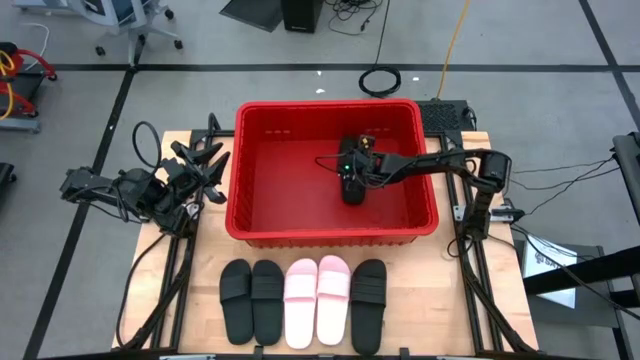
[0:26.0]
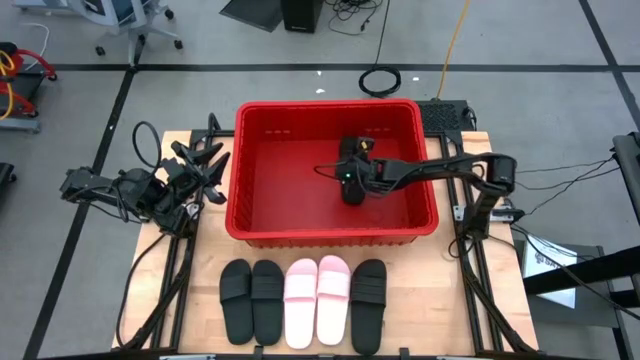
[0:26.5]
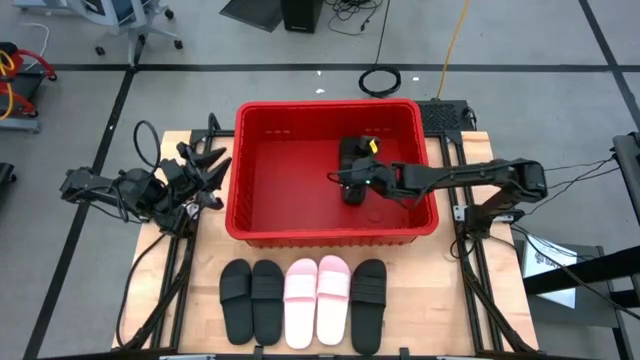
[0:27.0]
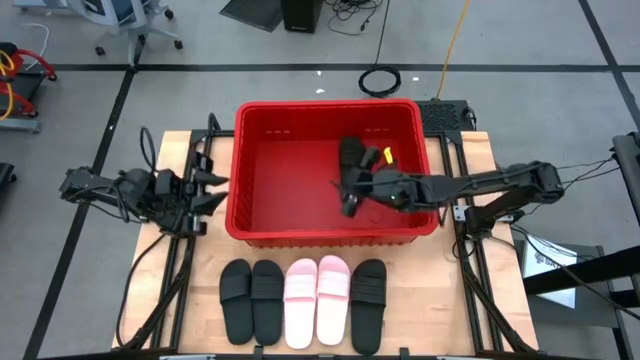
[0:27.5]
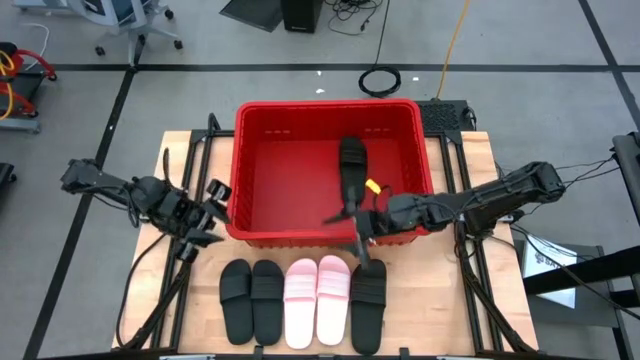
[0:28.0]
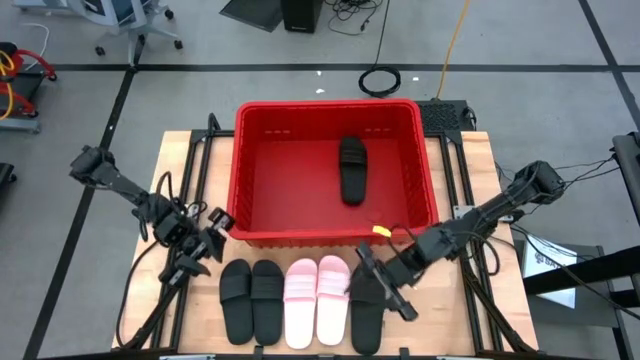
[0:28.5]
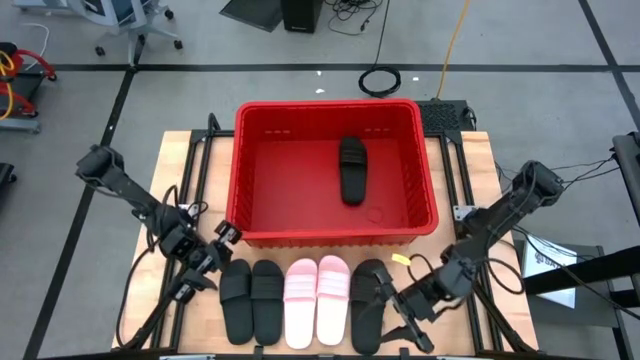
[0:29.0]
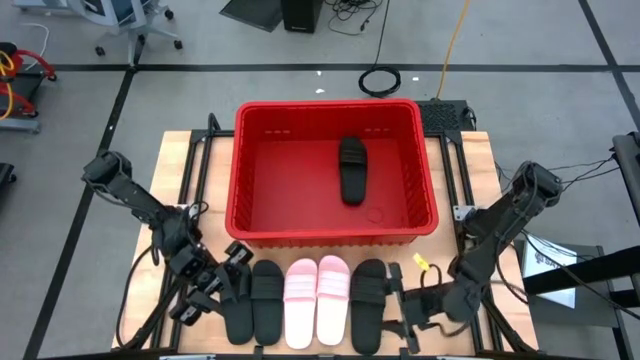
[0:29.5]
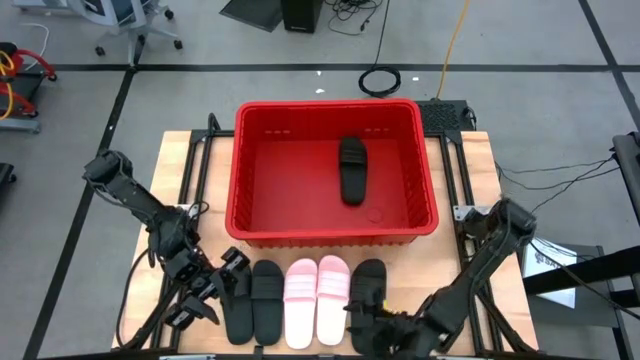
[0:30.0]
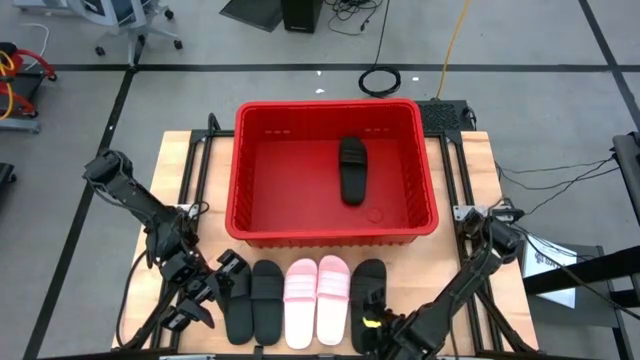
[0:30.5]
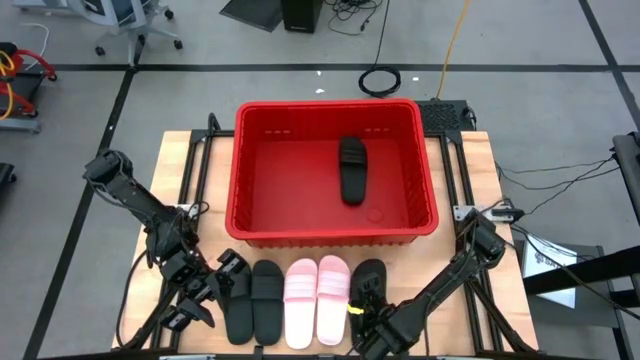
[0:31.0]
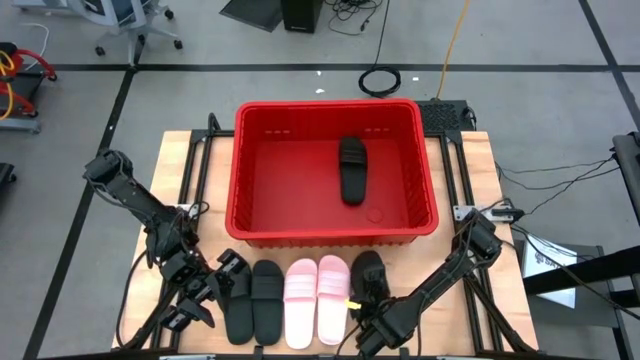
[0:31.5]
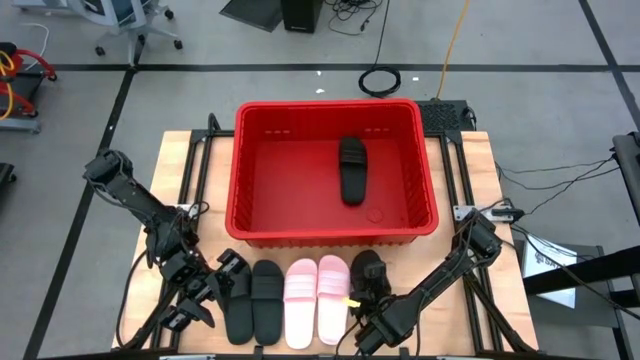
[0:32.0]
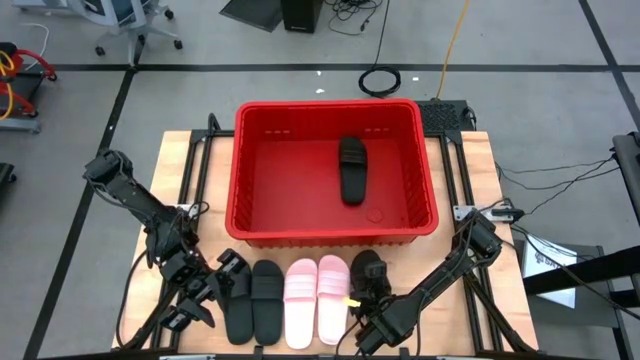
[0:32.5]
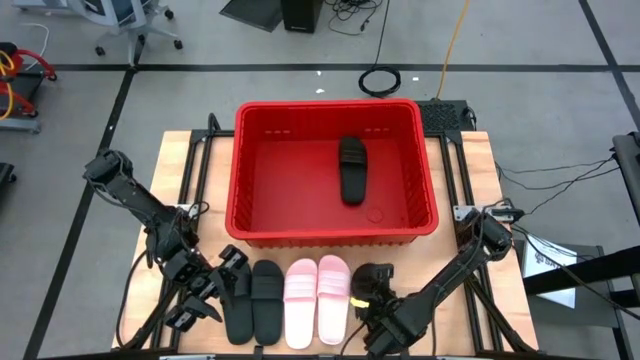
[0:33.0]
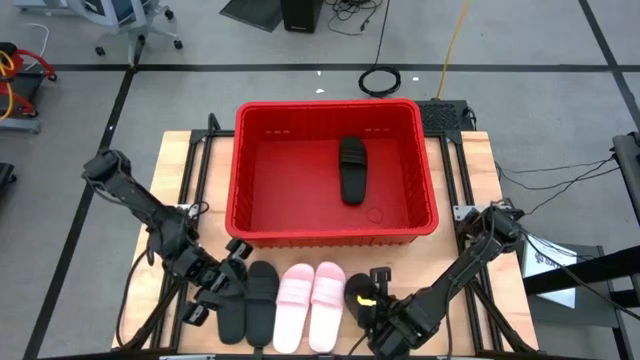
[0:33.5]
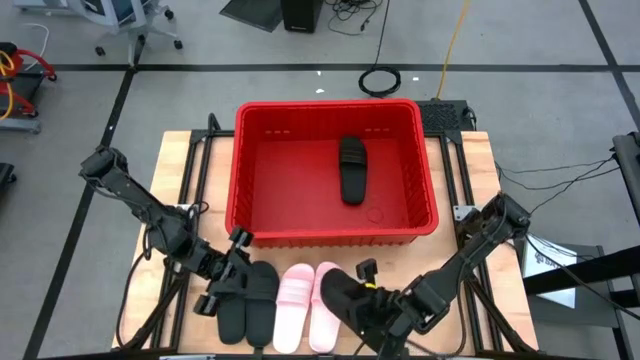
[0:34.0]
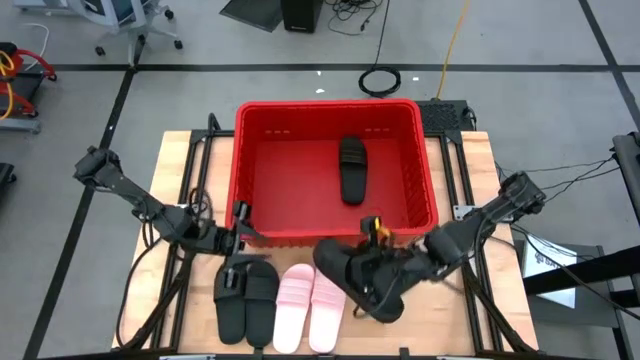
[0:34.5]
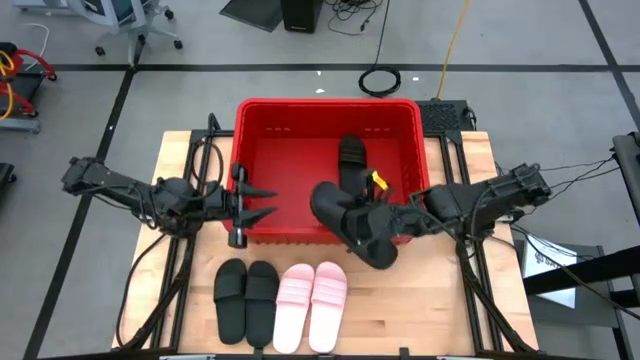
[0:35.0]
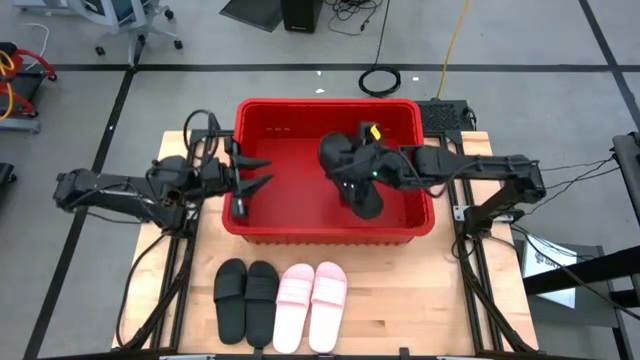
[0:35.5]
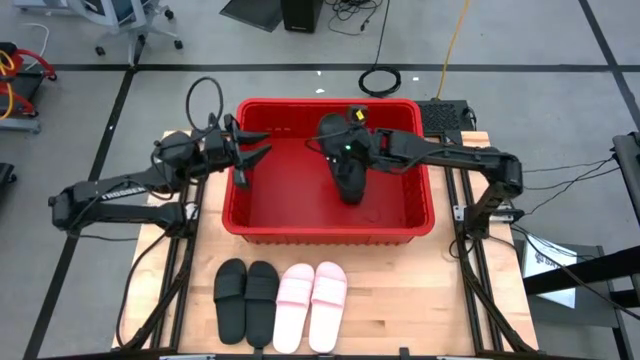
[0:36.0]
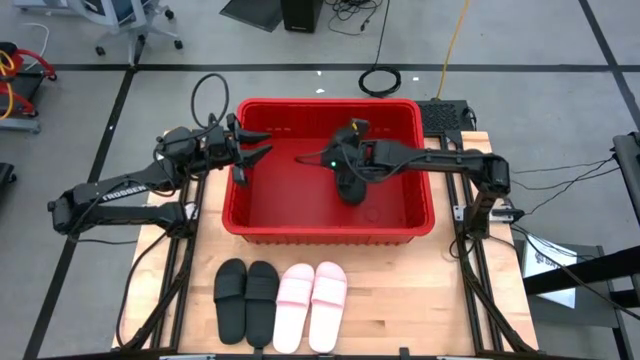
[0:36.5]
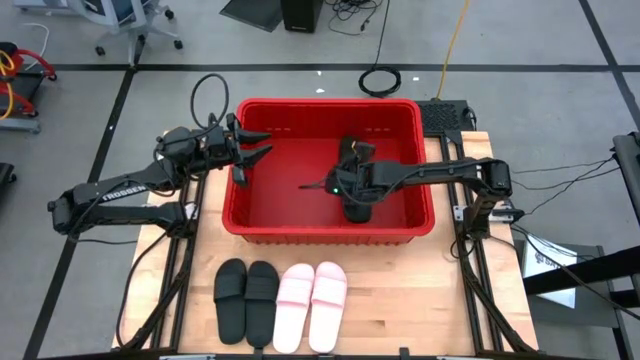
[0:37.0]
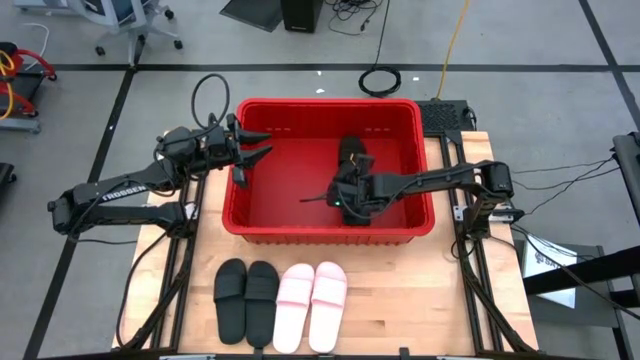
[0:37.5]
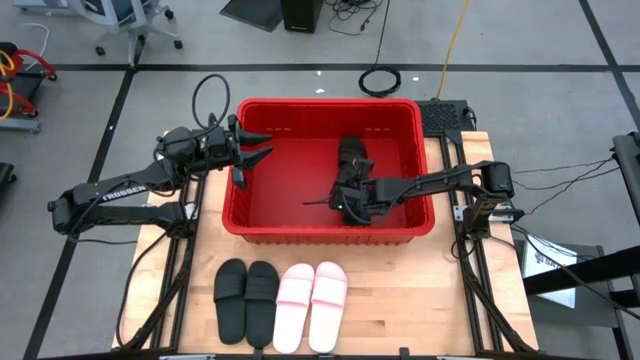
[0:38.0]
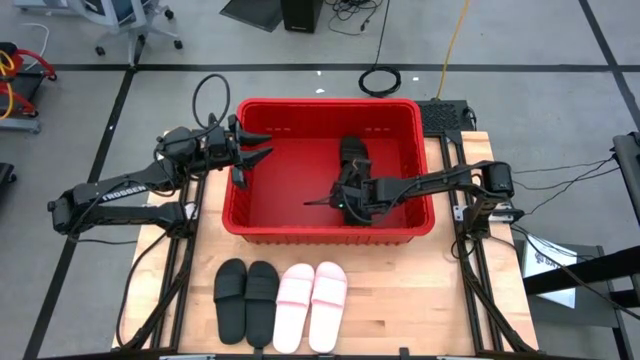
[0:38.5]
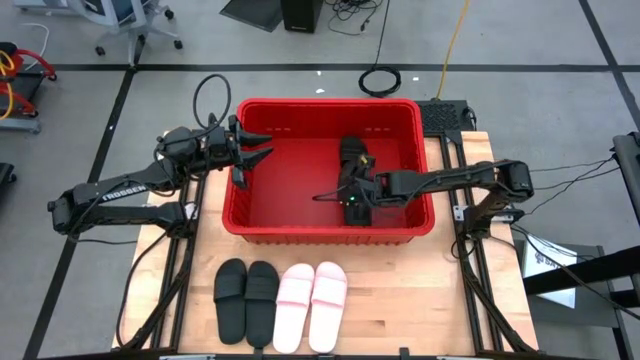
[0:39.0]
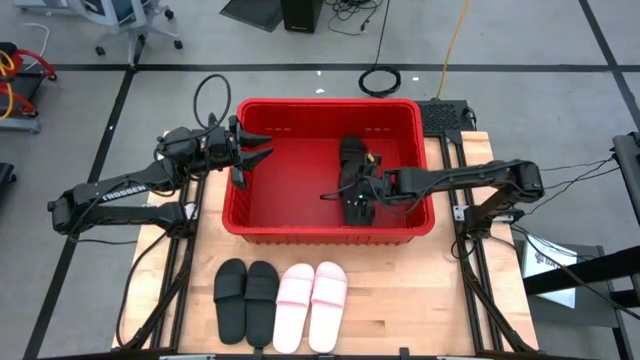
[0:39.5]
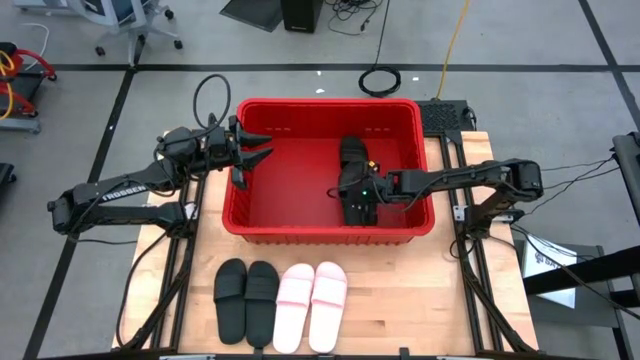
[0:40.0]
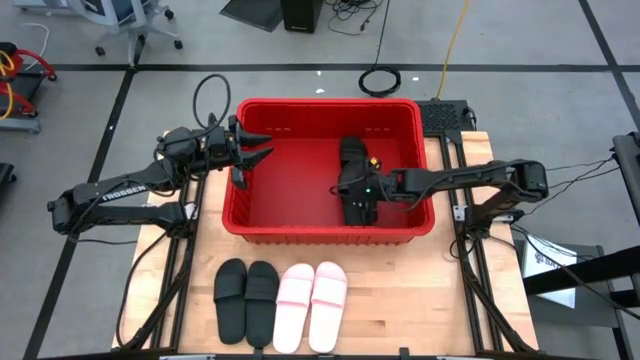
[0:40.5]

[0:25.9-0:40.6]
Task: Pick and place slides into bin
Put the black slide into the red bin

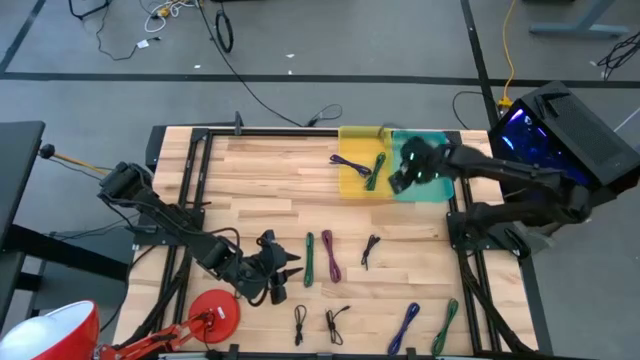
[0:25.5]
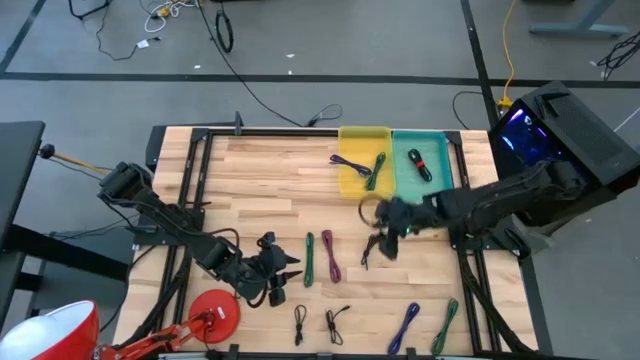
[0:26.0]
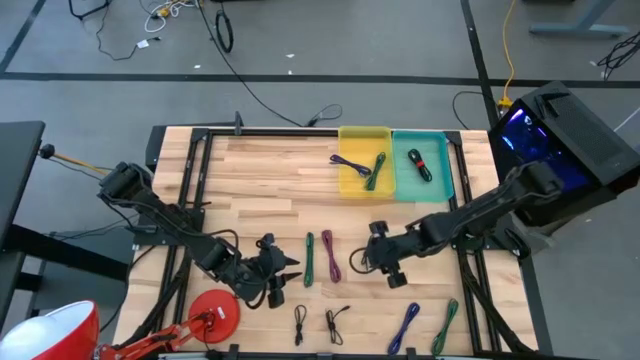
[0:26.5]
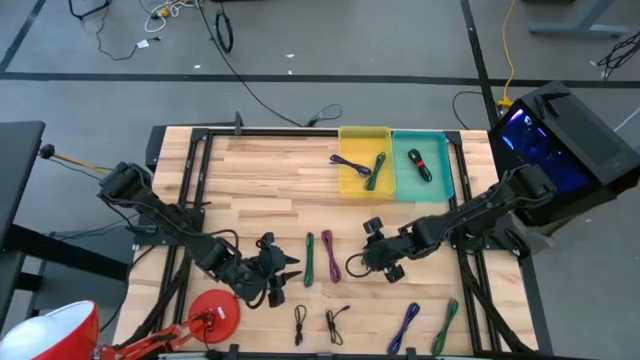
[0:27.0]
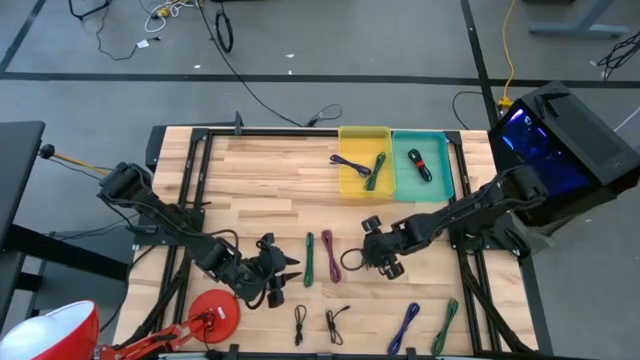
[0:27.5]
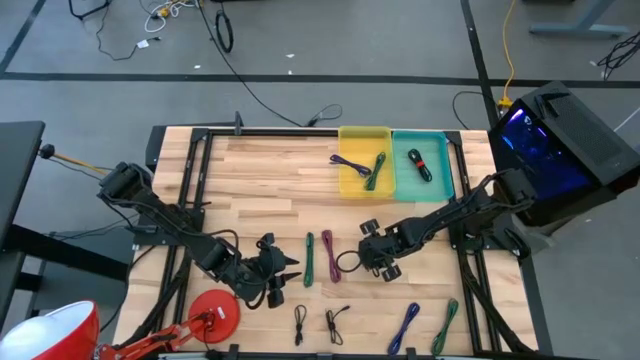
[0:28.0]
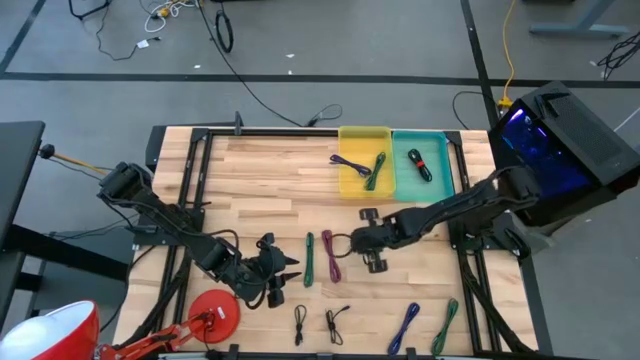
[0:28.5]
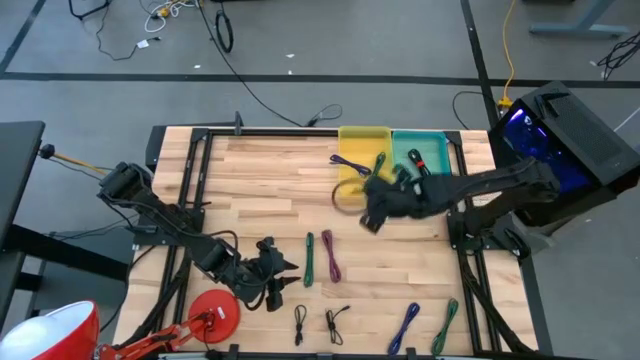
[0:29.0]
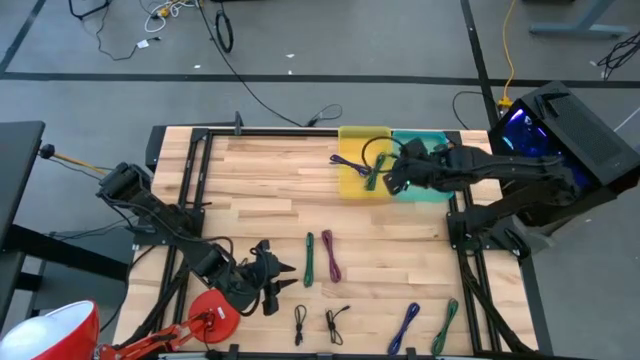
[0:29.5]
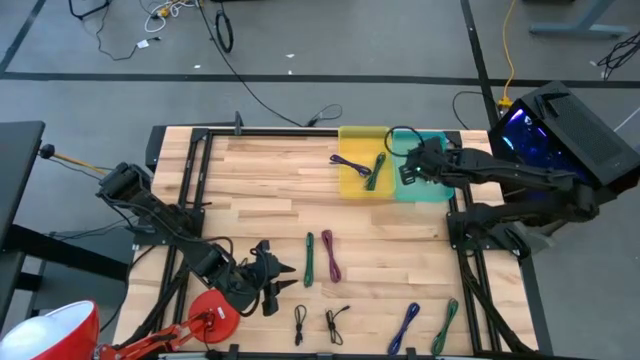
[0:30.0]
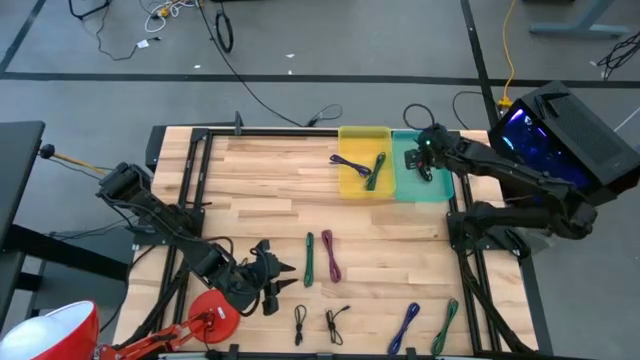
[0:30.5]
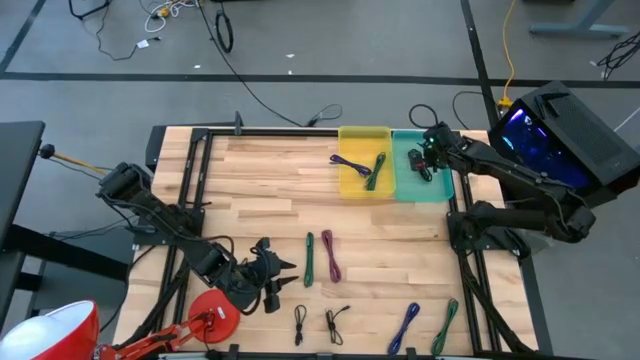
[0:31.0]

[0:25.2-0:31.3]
Task: Pick & Place USB Port
Put the black charger cable into the blue bin
